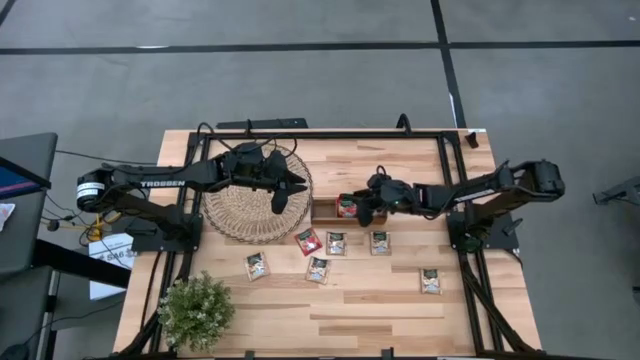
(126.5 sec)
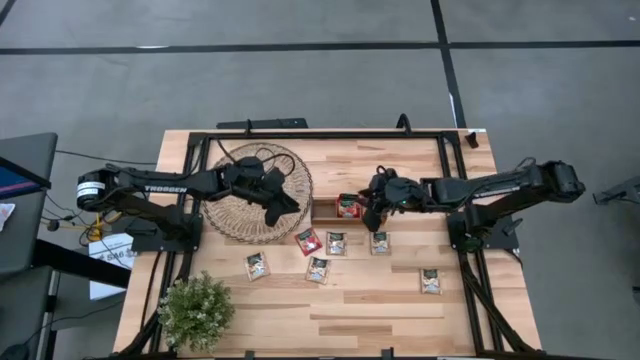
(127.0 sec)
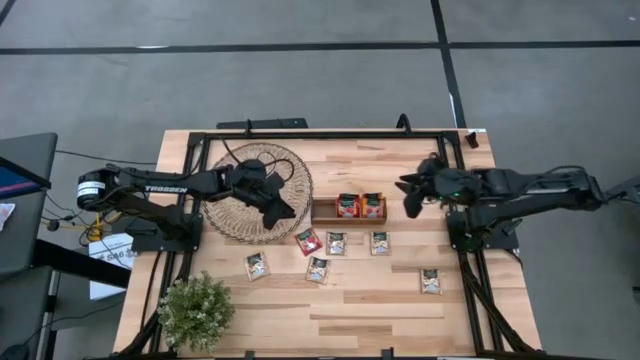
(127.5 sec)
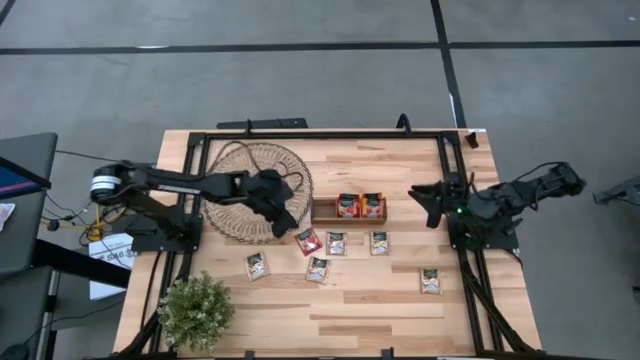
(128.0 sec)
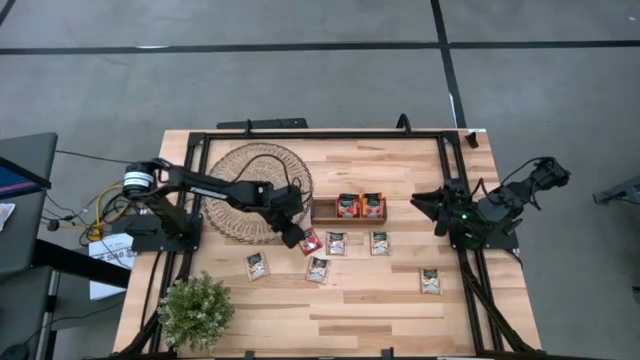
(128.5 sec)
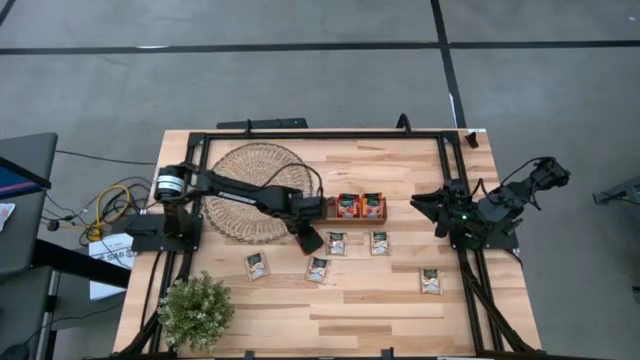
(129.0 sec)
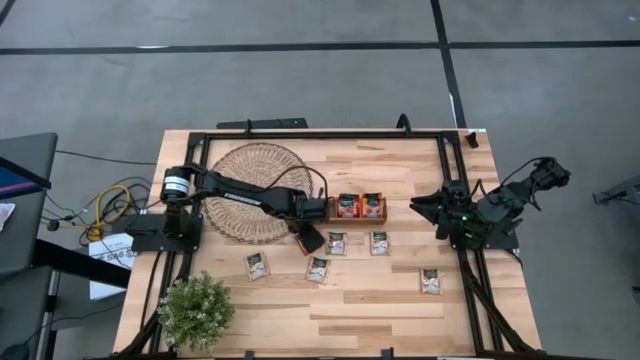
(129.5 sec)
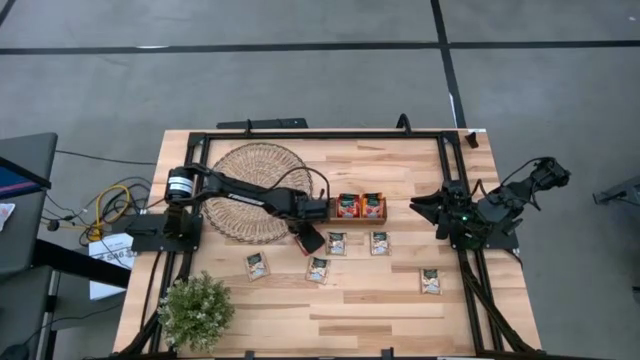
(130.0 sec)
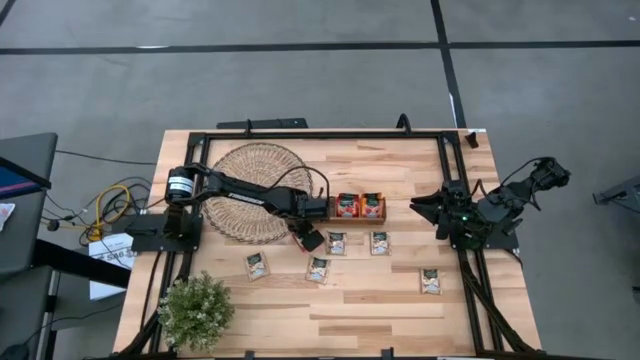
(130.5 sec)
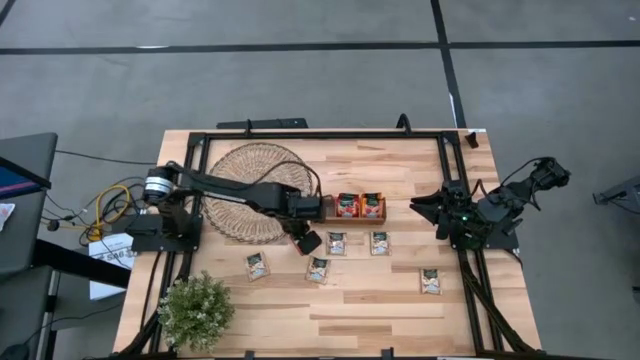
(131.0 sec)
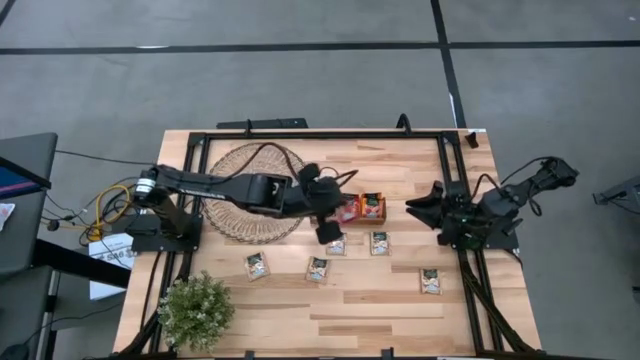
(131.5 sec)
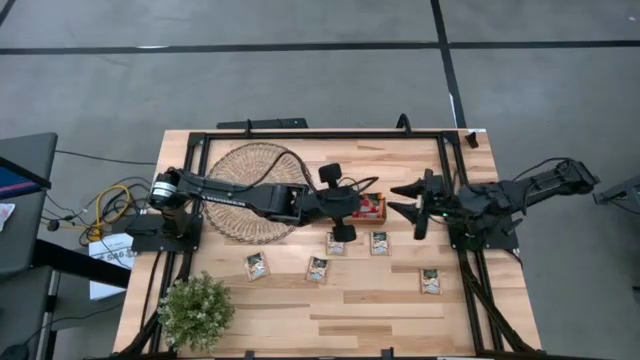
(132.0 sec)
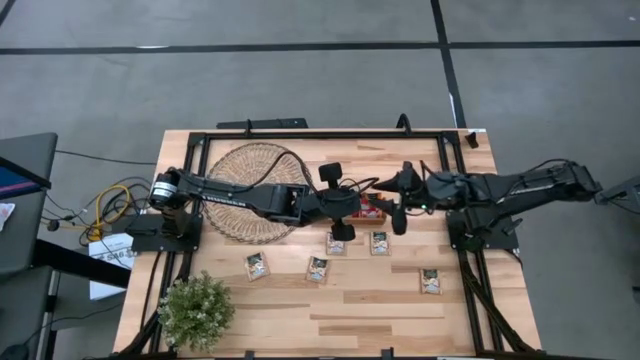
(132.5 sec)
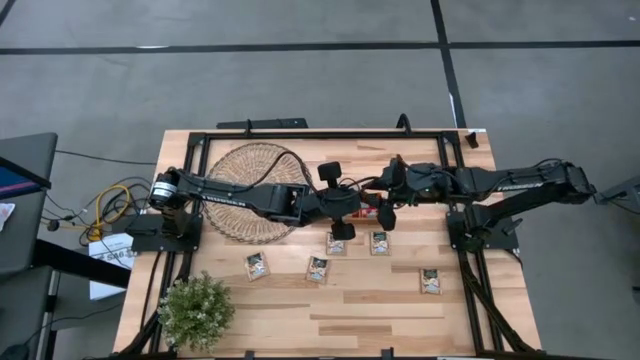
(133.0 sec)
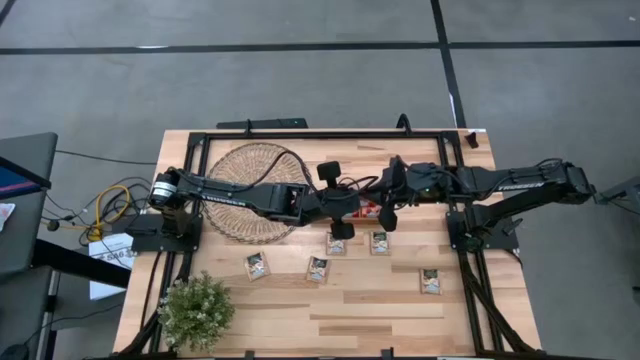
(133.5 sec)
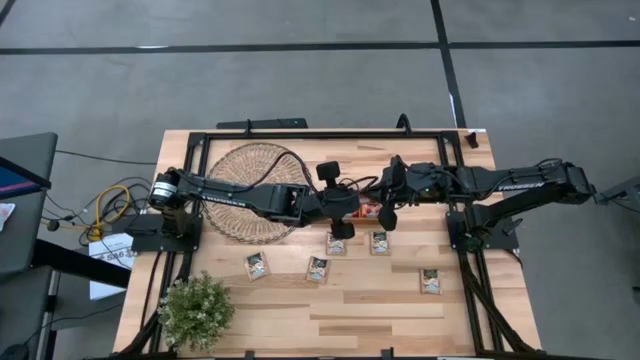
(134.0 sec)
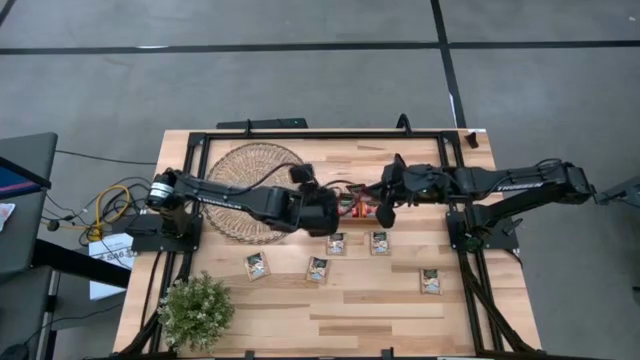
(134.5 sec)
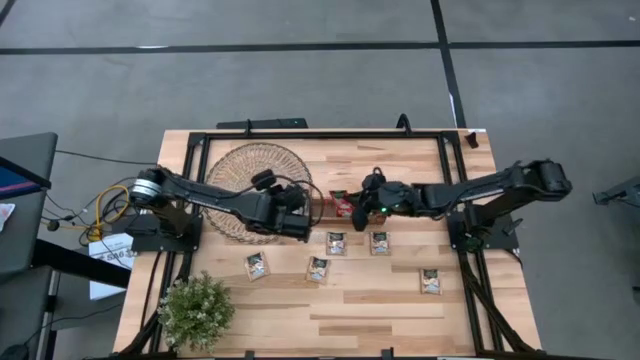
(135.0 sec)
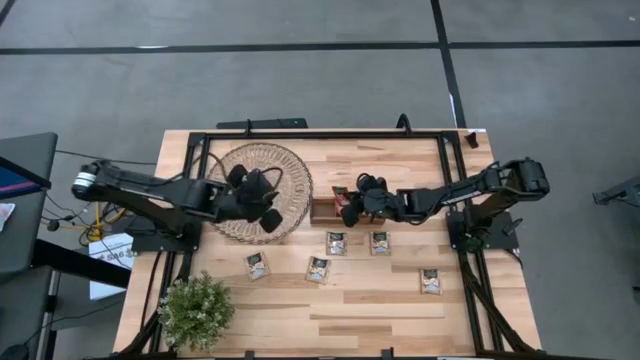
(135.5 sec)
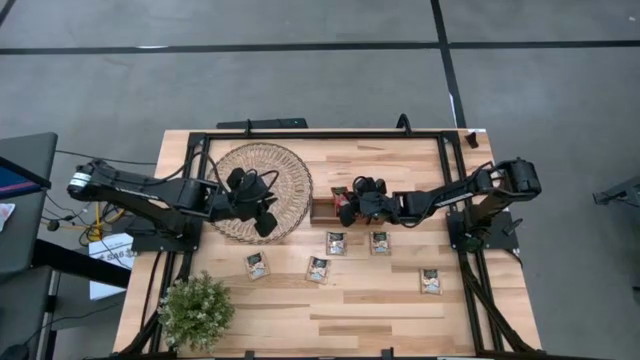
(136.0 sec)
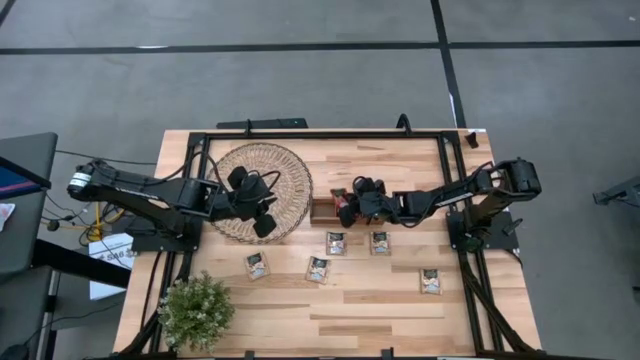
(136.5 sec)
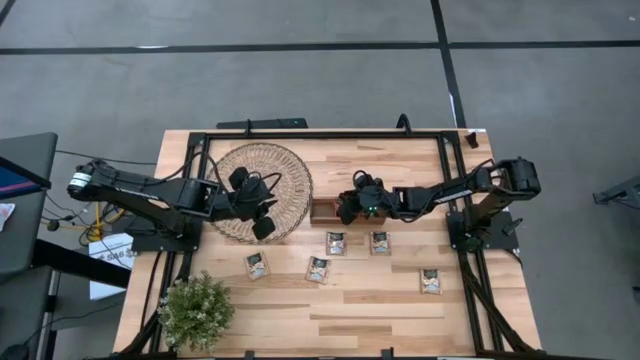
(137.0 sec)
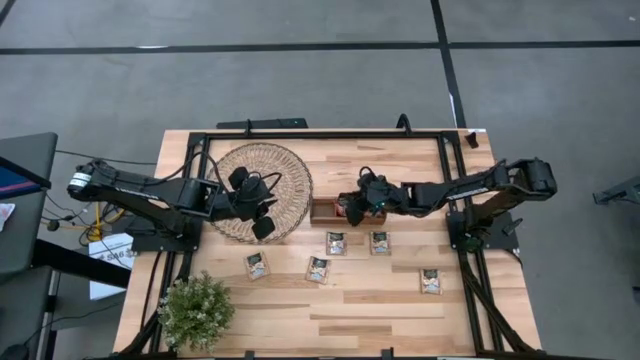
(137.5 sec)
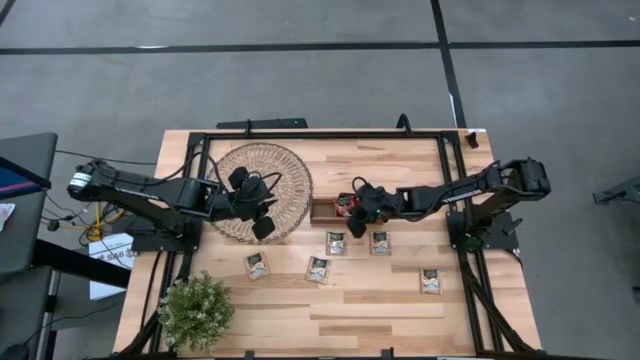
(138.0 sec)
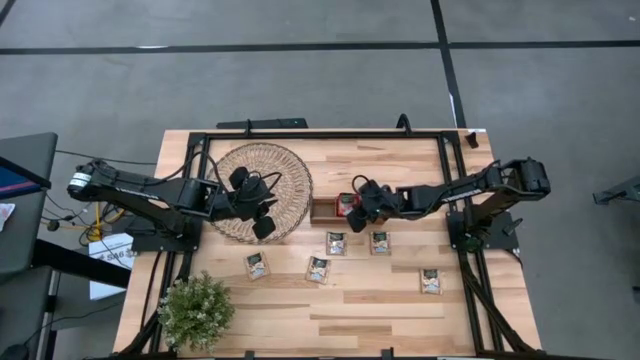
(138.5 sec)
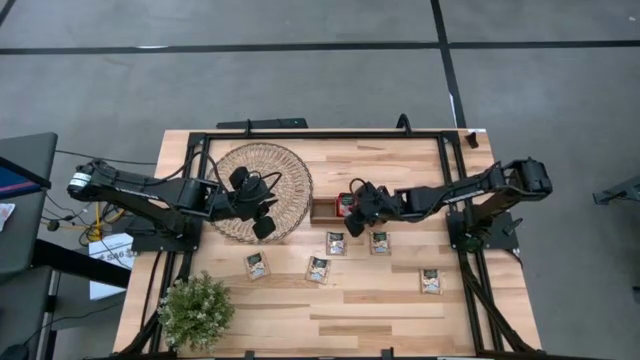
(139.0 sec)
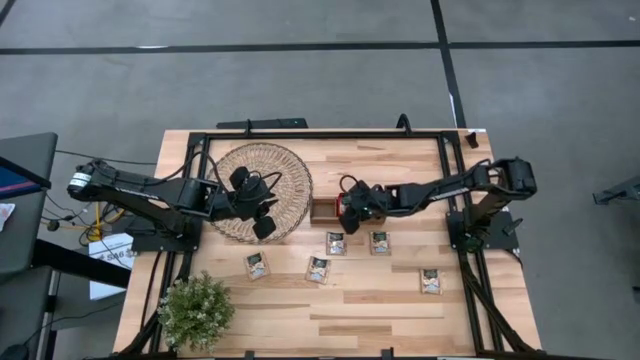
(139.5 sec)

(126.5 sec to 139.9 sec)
Task: Pick & Place Tea
Put the red tea bag into the middle section of the wooden organizer

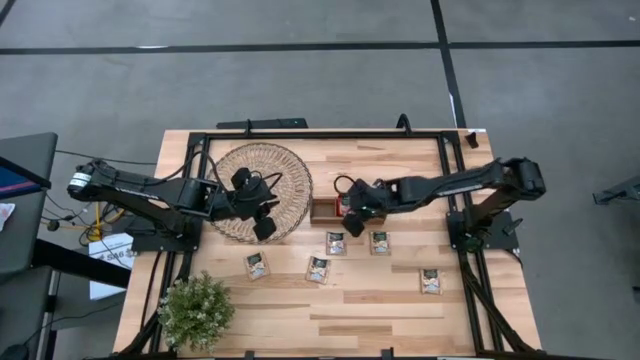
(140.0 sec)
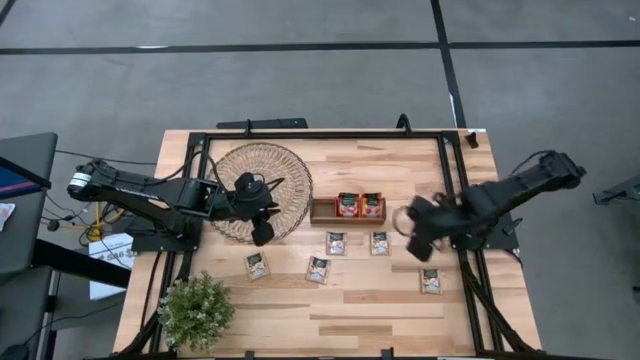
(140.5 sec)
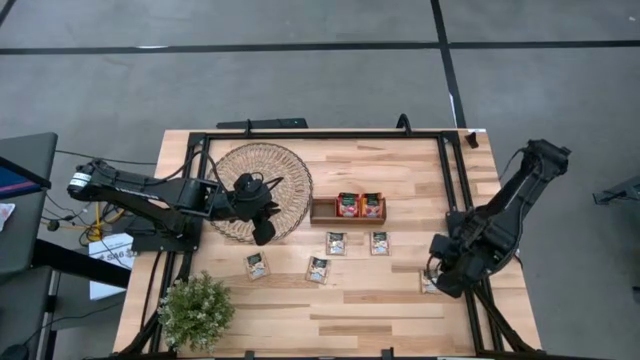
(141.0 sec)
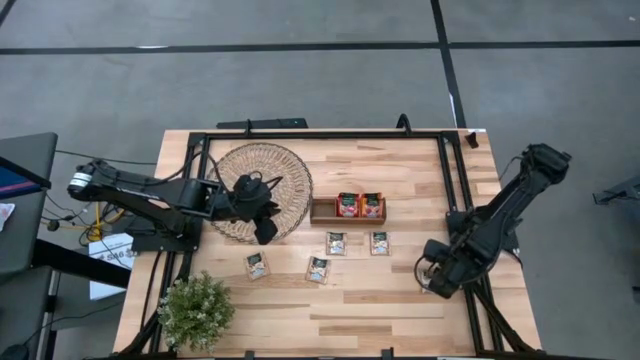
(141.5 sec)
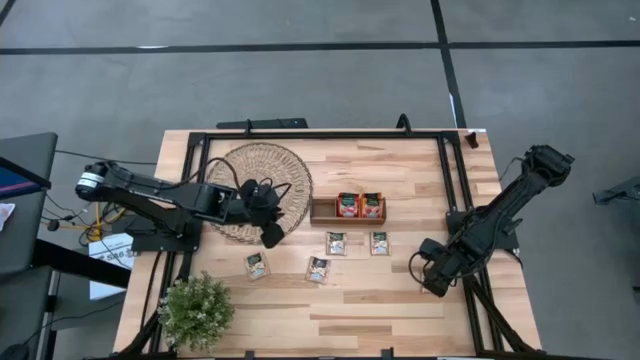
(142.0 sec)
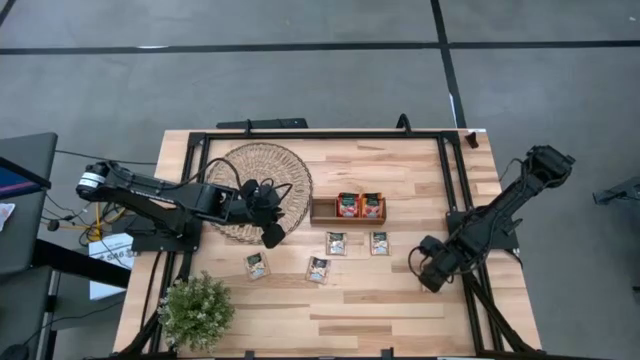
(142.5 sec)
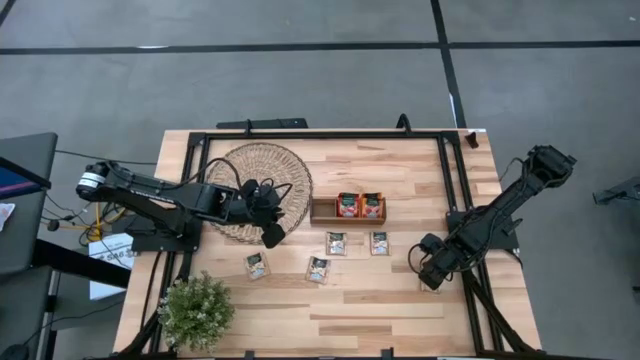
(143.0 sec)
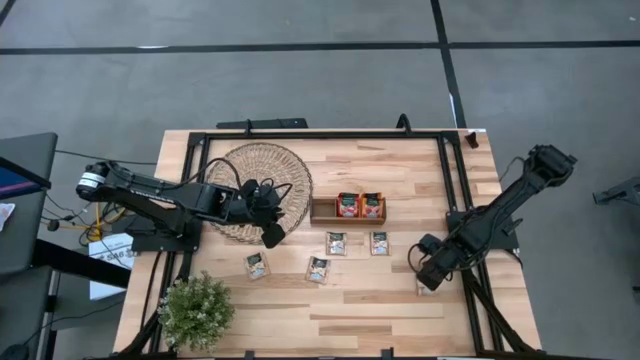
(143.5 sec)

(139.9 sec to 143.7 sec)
Put the brown tea bag into the left section of the wooden organizer

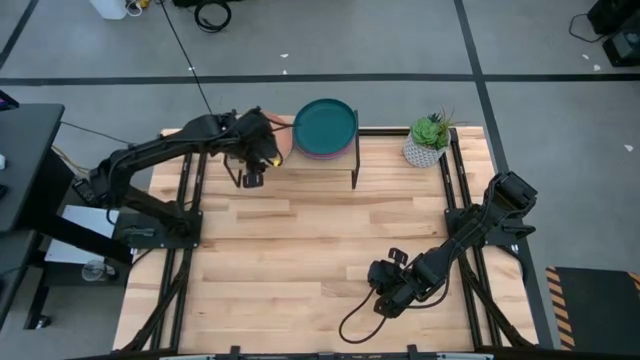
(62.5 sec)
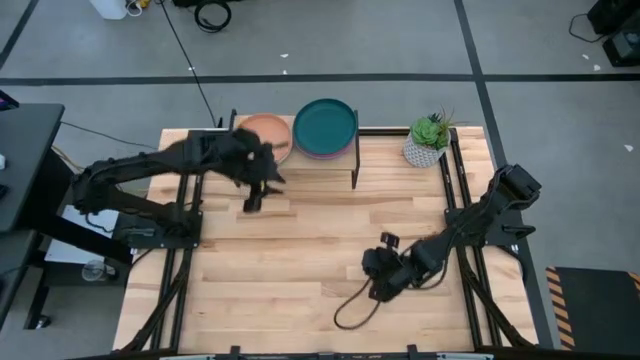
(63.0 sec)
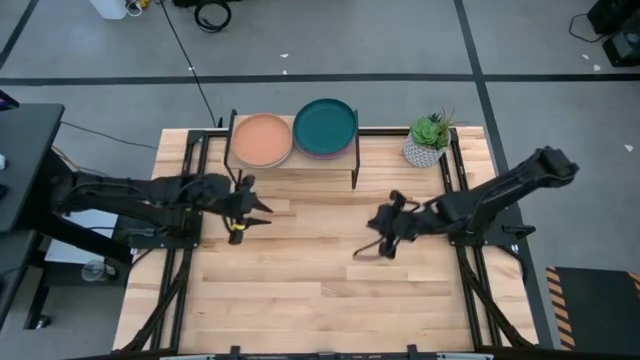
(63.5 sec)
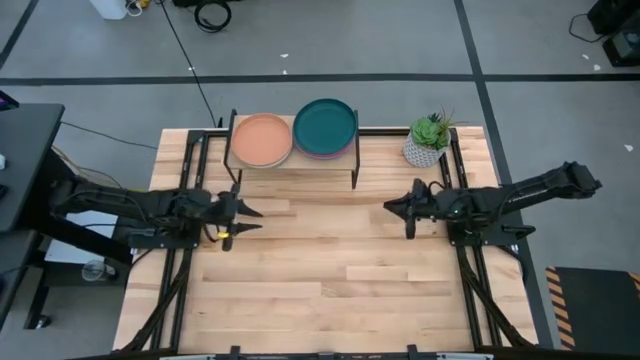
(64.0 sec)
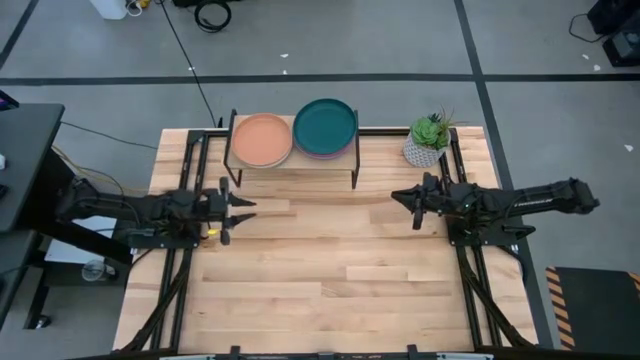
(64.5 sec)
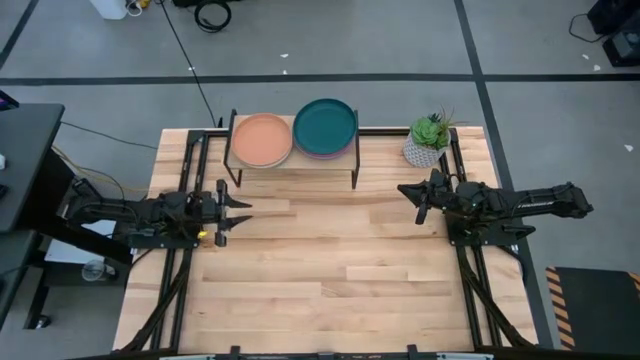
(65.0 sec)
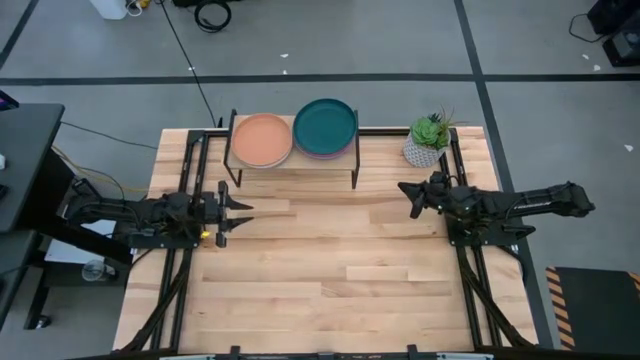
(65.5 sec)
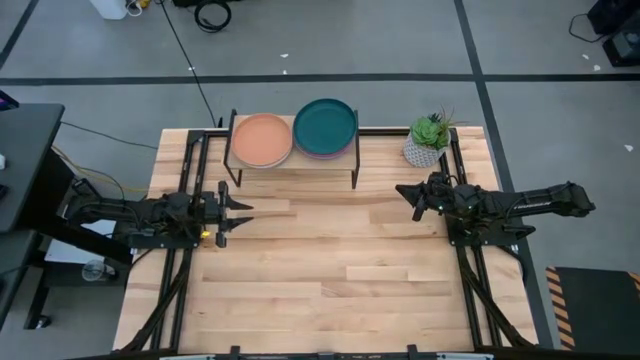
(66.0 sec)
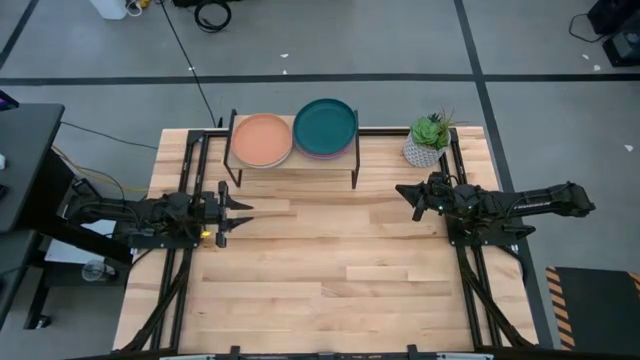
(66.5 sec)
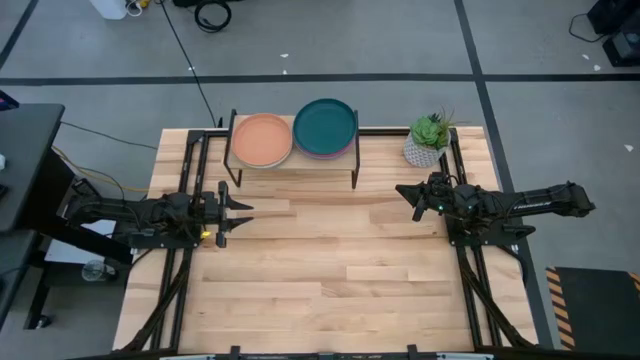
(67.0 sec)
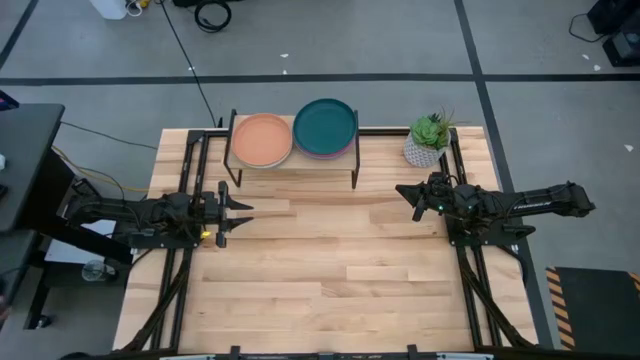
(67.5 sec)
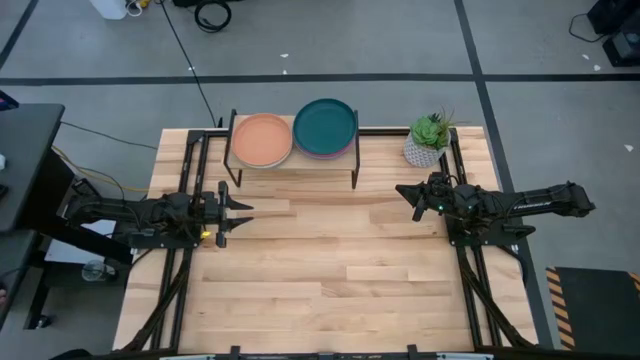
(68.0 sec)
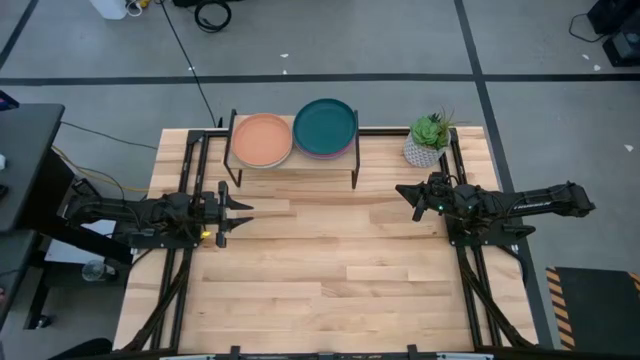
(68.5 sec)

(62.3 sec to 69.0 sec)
Task: Place and stack plates onto a shelf
Return to Home Position
